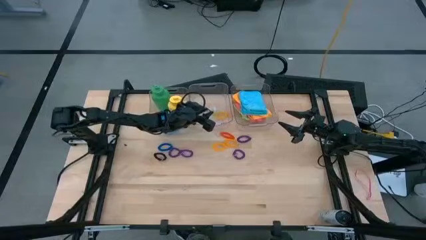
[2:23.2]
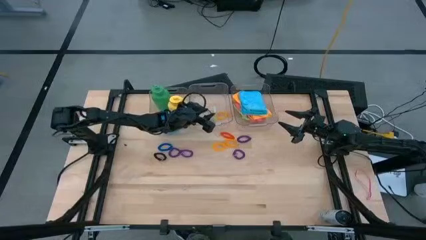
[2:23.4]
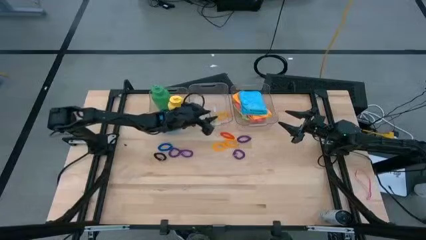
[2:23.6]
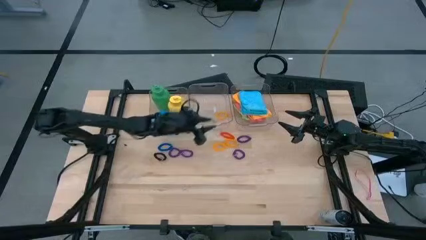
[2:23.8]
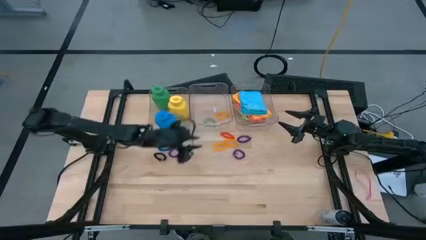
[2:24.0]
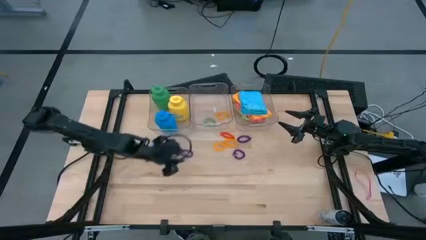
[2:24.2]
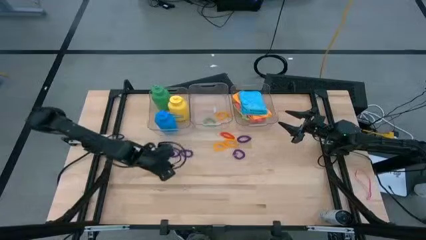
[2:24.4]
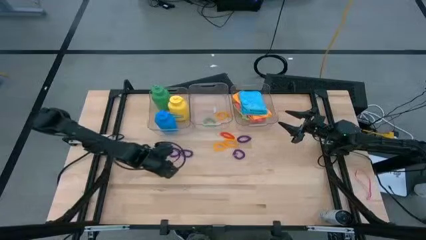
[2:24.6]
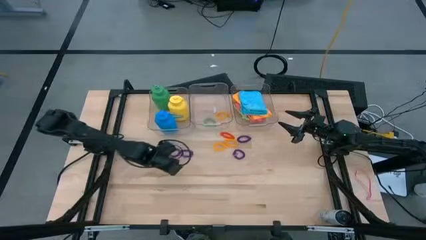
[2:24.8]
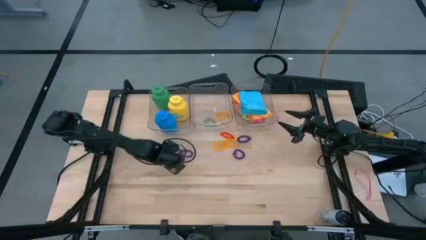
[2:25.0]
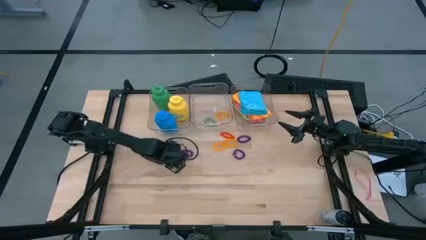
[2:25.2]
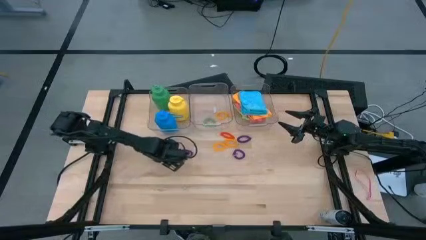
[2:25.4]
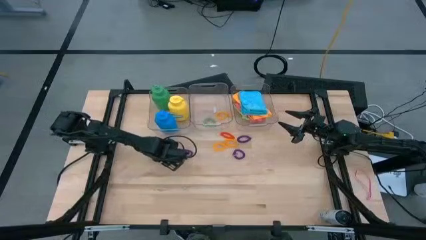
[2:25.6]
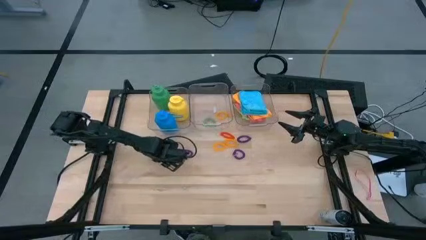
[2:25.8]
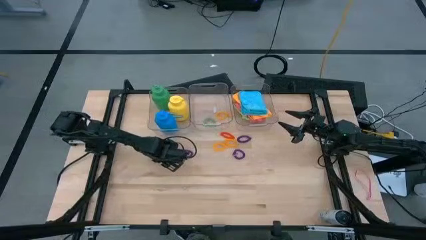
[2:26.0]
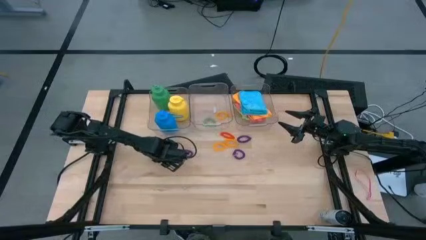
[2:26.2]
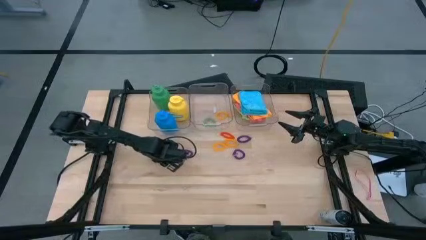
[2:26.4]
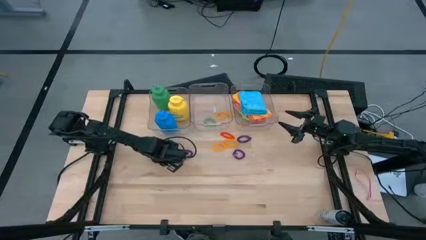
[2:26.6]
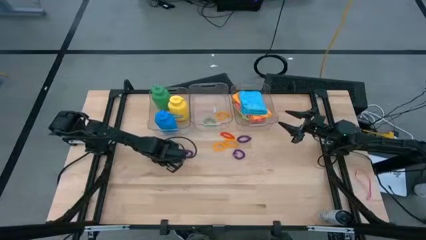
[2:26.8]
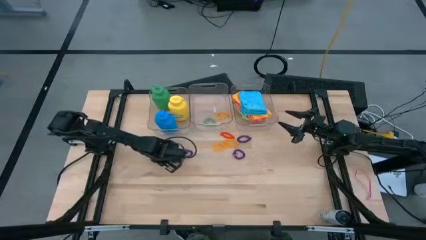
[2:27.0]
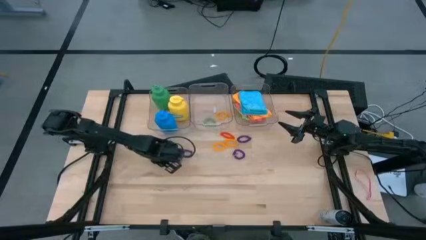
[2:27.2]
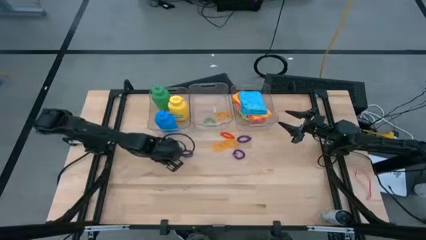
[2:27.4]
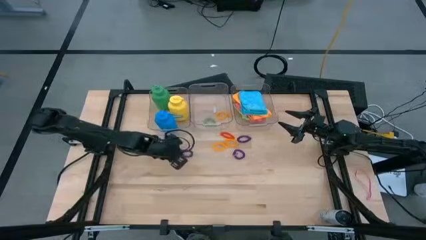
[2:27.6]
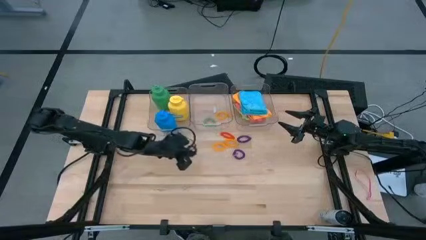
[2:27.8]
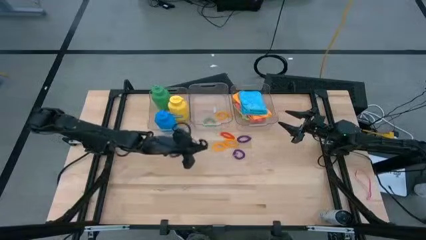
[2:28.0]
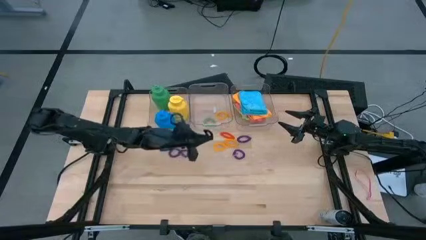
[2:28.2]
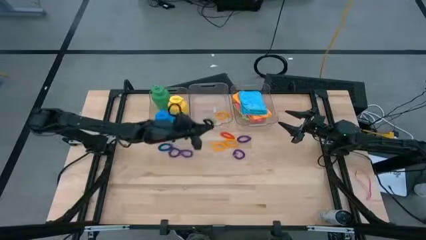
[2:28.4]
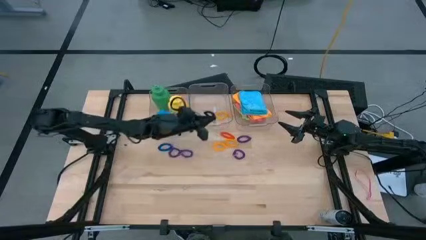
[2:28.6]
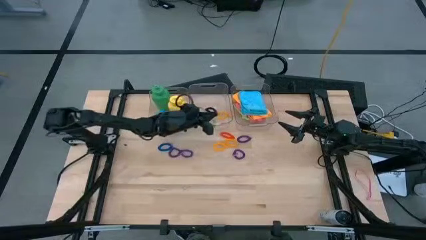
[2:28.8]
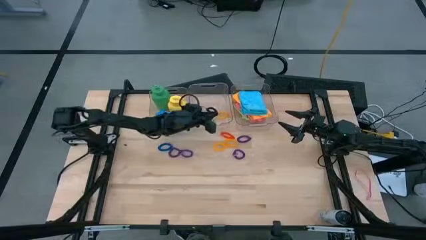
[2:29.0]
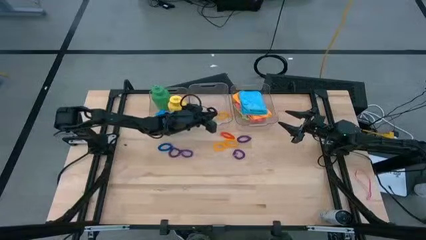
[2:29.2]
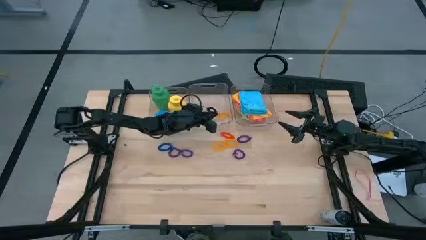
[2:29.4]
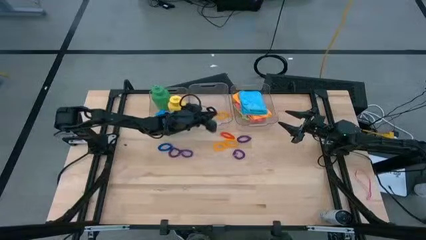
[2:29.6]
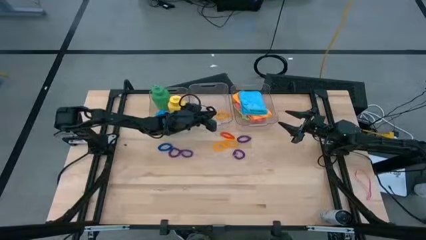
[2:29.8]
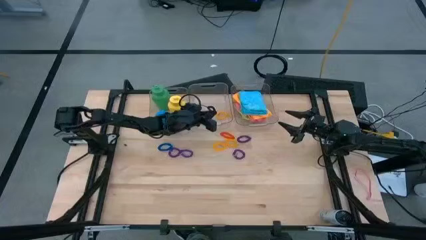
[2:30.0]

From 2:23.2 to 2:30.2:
Task: Pick & Place Sports Items
Put the black wrist coil into the middle transparent container

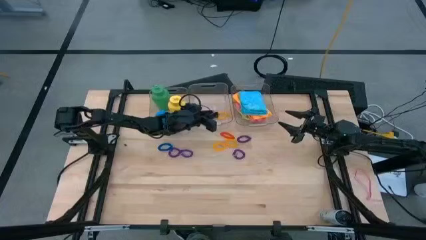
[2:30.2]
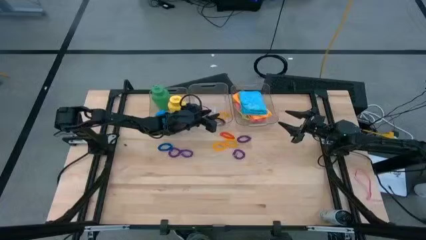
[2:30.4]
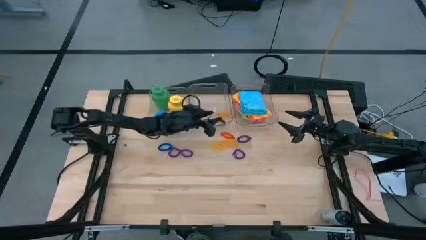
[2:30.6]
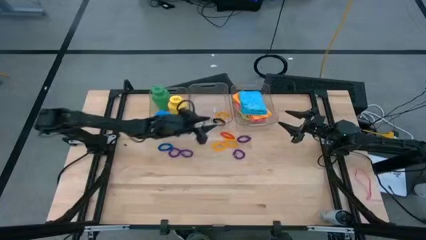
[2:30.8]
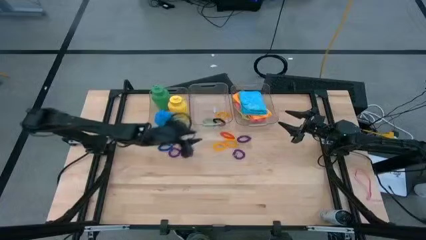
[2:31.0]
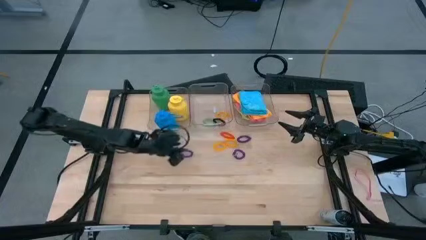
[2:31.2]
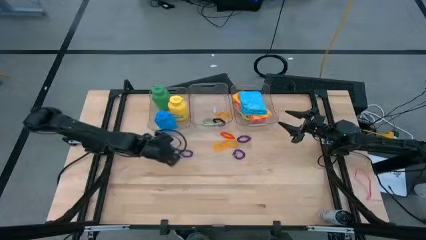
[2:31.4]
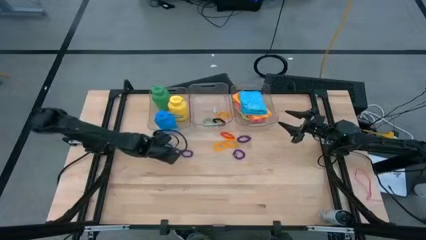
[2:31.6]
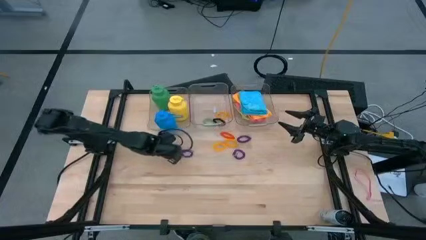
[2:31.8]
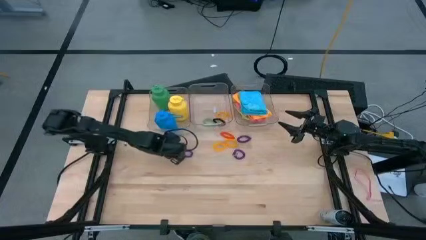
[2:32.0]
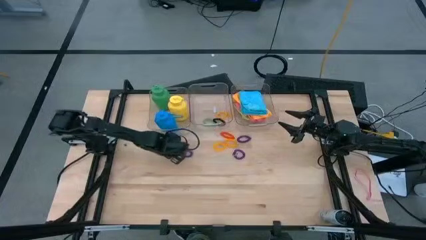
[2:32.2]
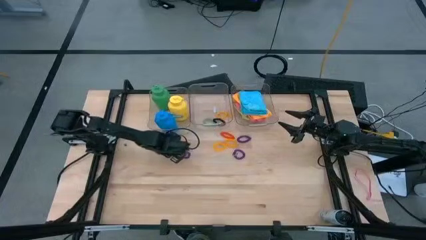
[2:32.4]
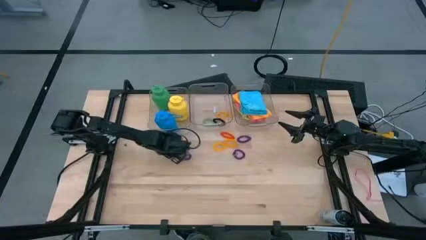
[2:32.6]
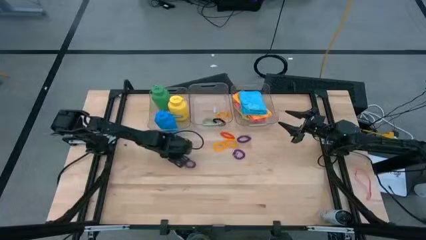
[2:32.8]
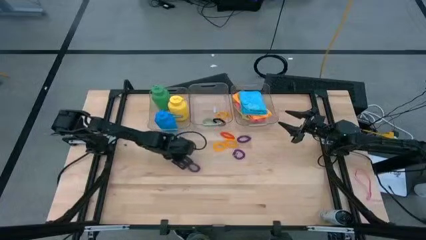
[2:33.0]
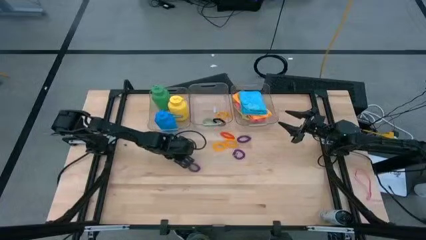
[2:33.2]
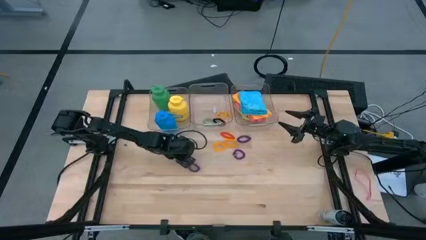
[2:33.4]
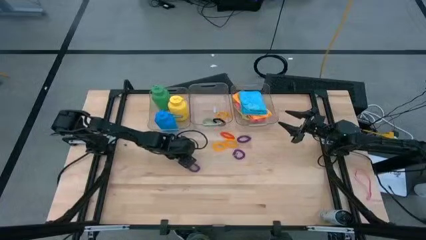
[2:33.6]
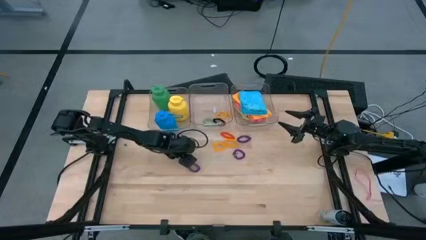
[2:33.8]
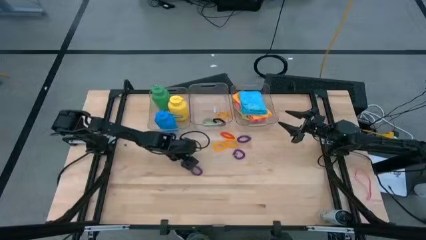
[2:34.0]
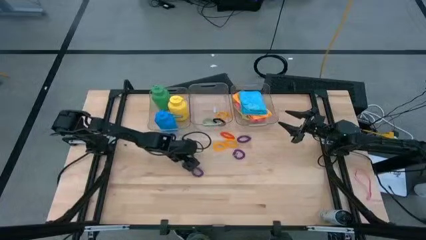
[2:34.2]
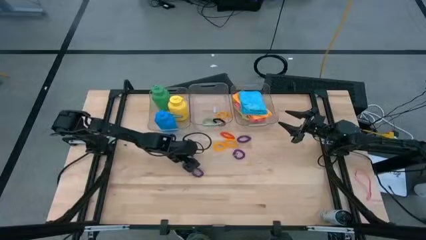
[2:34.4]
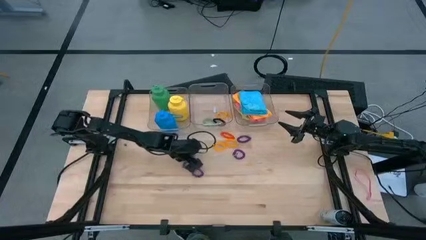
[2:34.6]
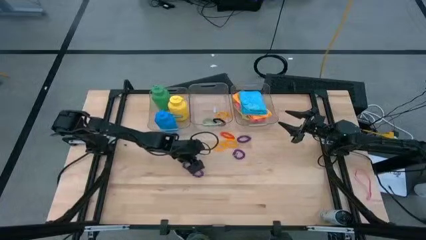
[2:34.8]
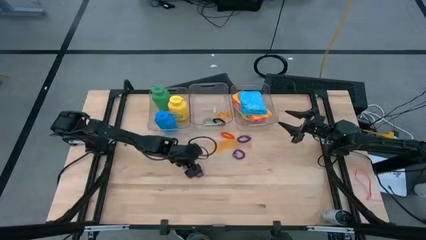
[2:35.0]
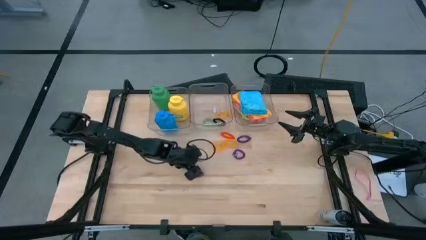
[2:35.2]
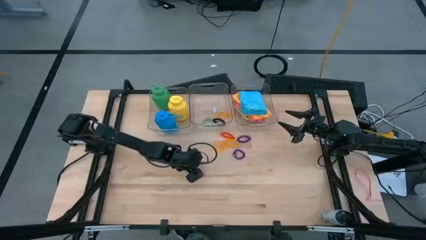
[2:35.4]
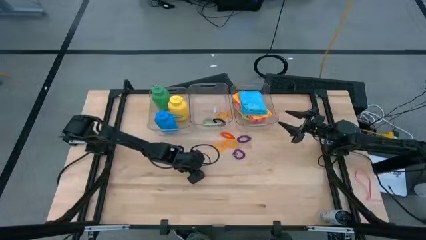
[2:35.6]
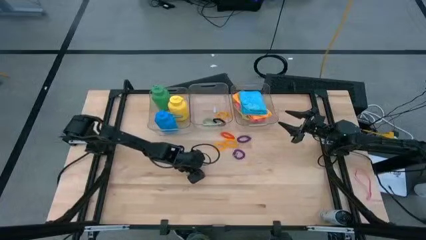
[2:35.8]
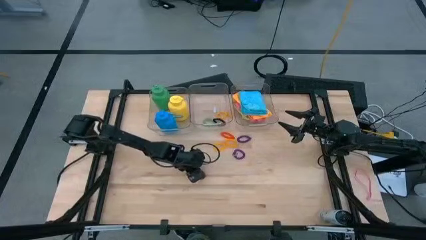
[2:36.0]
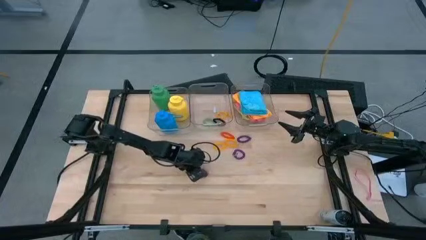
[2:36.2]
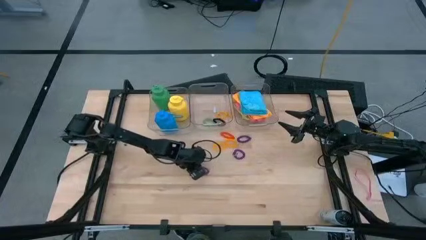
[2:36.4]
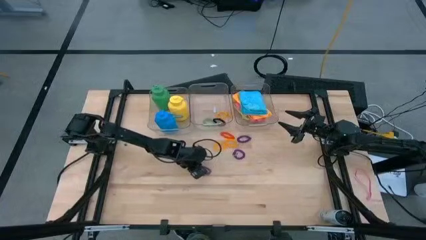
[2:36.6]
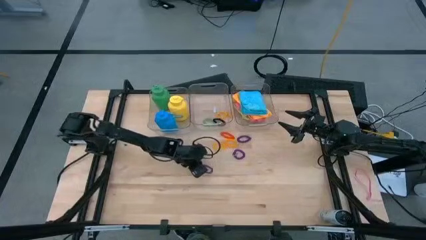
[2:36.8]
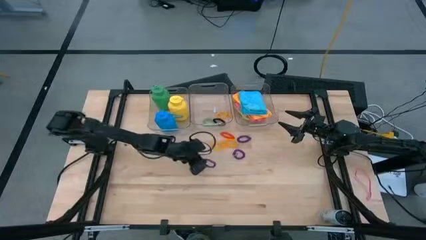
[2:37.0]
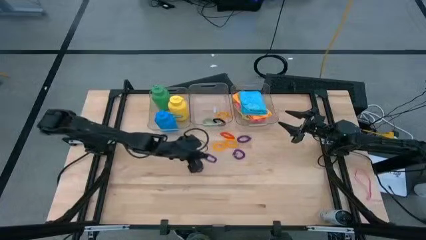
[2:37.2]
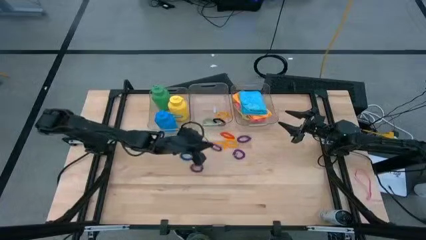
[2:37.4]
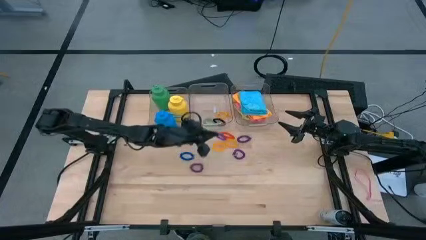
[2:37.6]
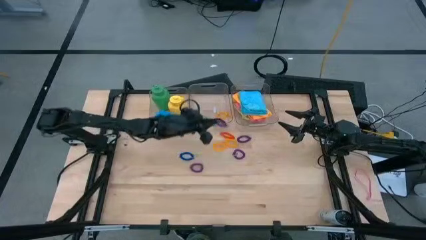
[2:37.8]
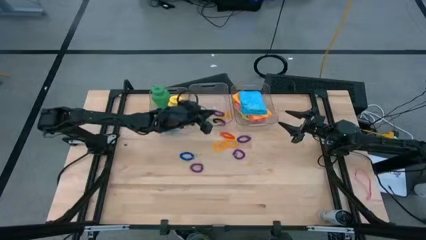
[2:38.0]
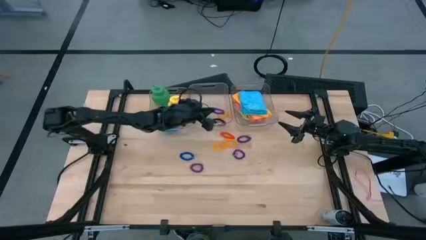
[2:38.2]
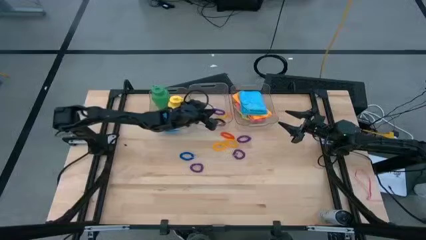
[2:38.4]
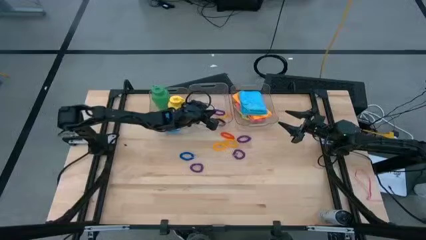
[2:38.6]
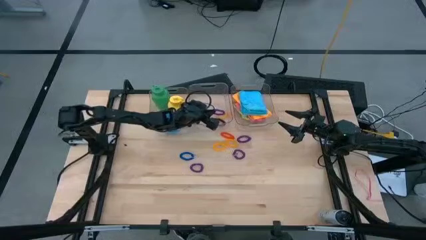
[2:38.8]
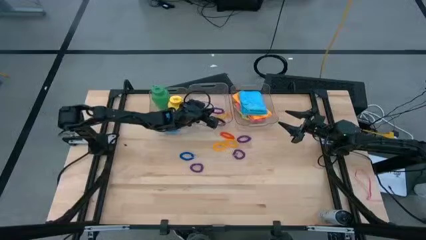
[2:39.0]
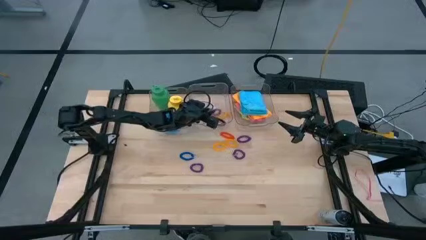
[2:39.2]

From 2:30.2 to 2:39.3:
Put the purple wrist coil into the middle transparent container
